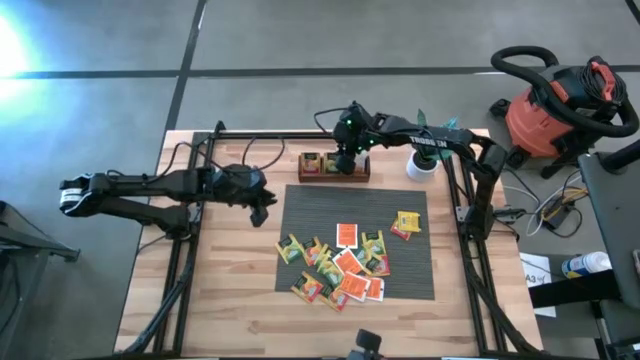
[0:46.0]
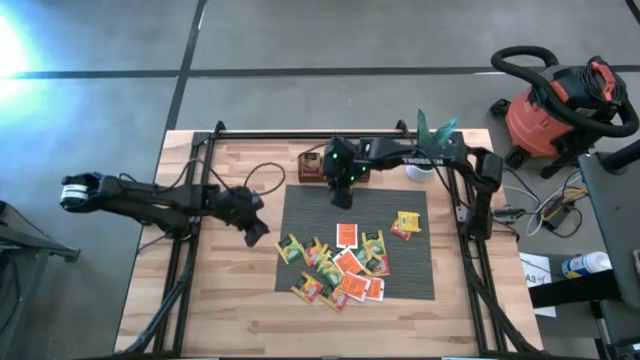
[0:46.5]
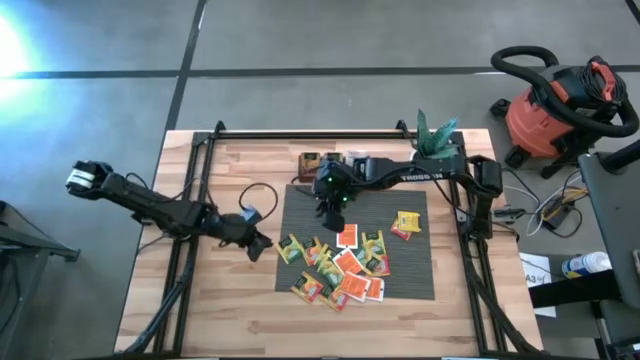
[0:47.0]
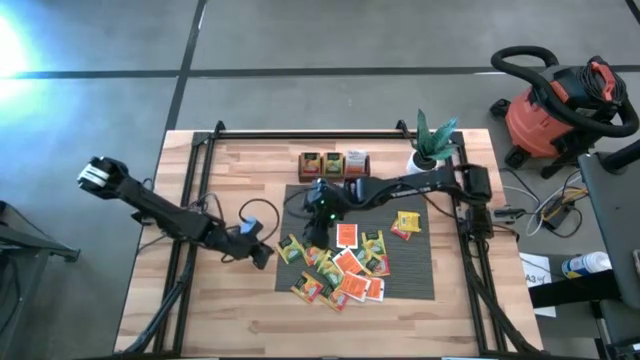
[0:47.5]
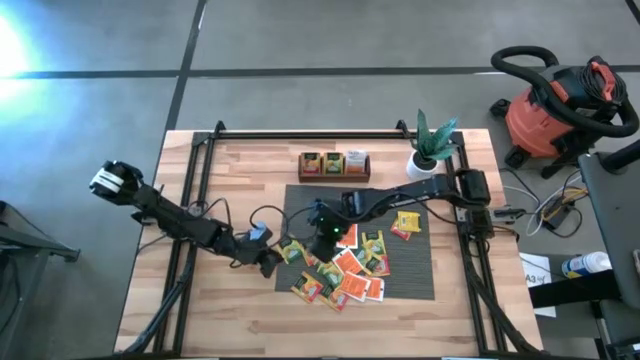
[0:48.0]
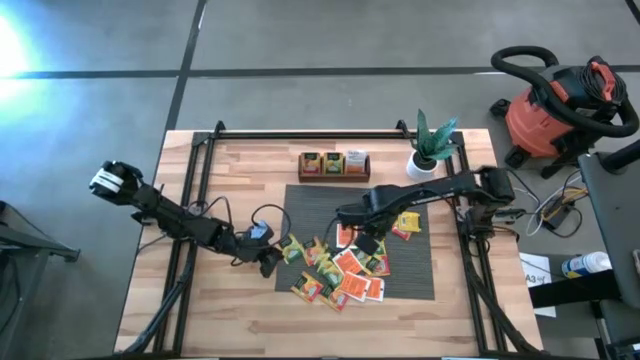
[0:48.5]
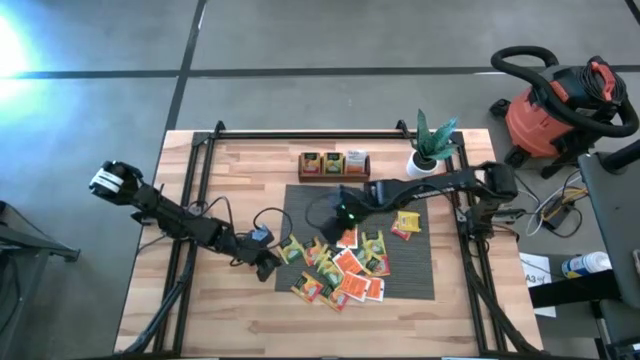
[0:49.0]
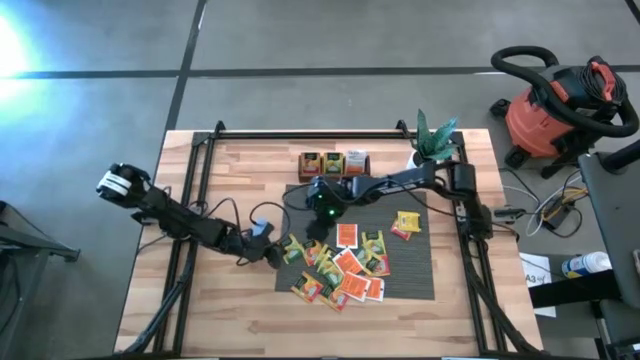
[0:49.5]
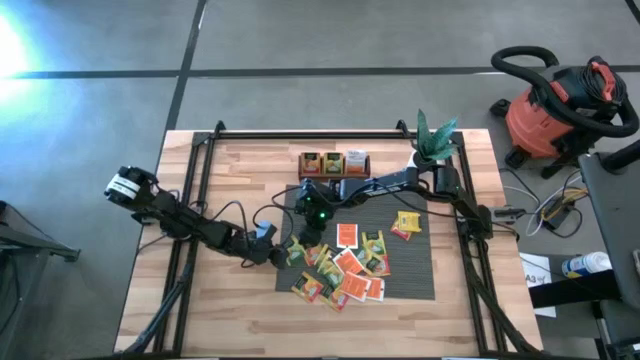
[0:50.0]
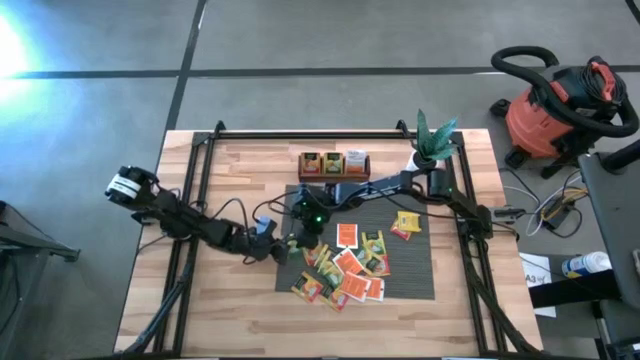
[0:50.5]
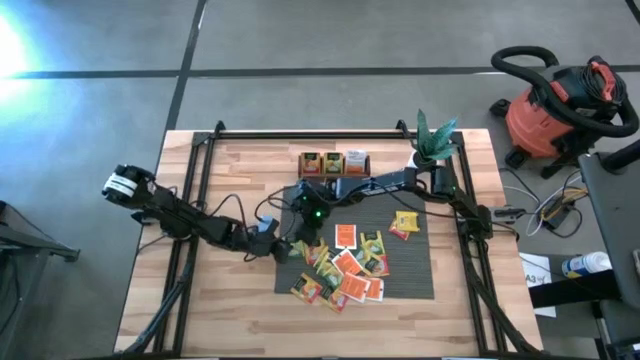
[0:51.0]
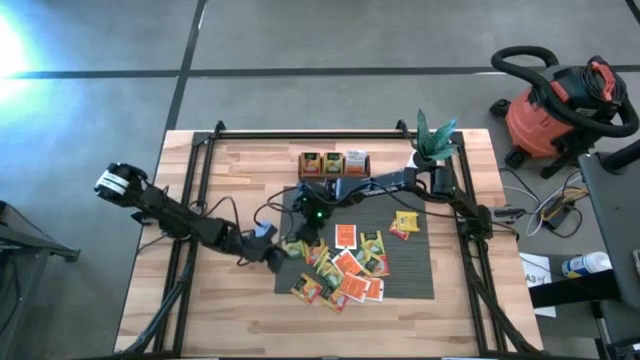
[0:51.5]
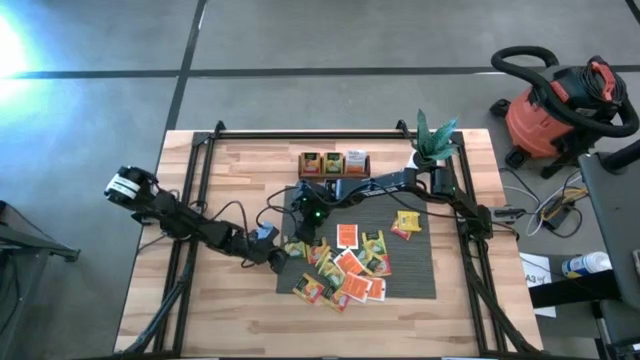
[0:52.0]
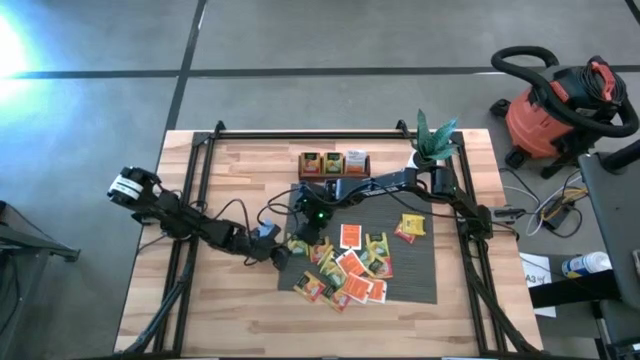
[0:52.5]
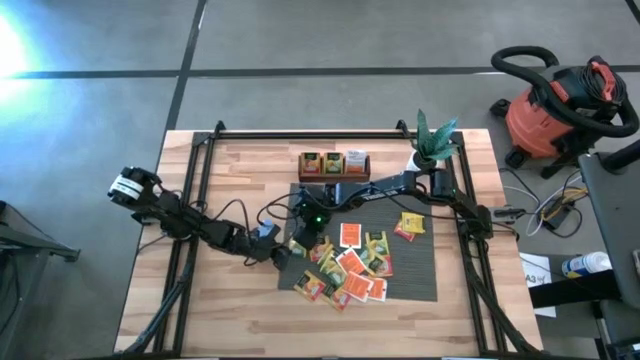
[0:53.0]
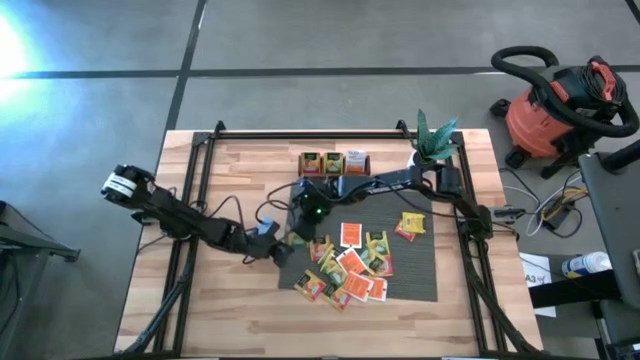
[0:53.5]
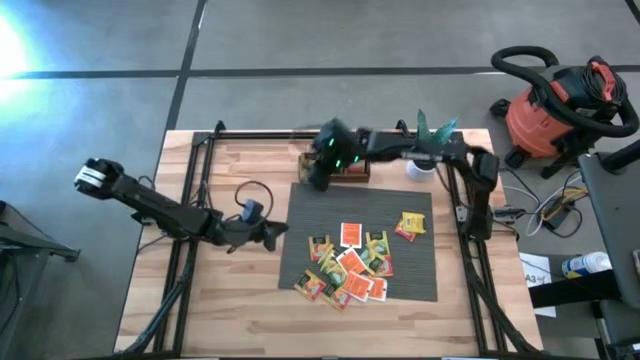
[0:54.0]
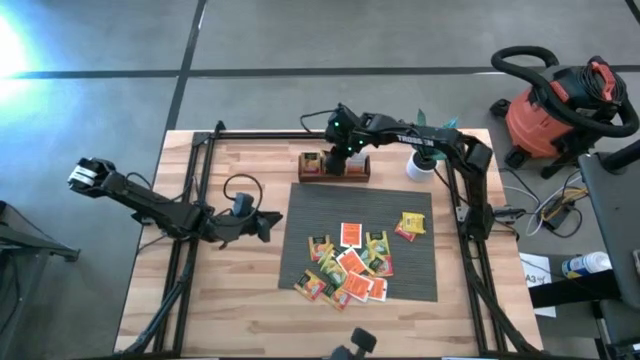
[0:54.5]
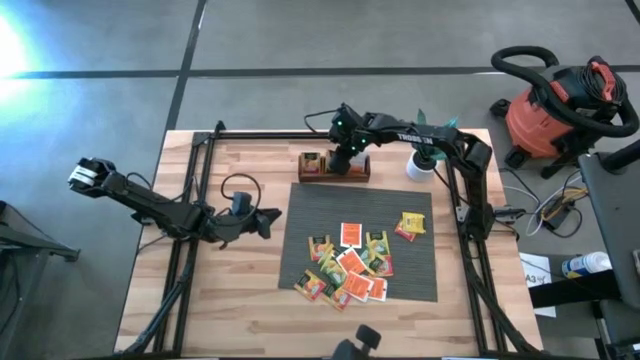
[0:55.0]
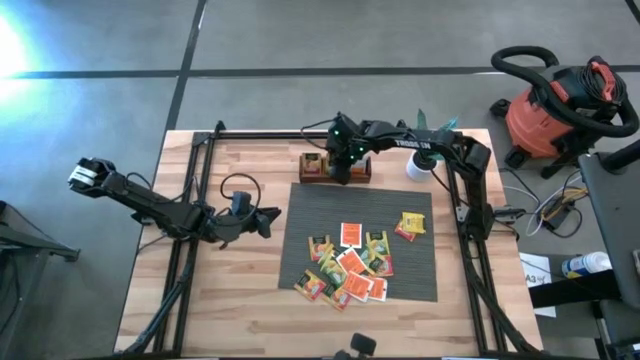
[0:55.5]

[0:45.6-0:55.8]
Task: Pick & Place Tea
Put the yellow tea bag into the middle section of the wooden organizer

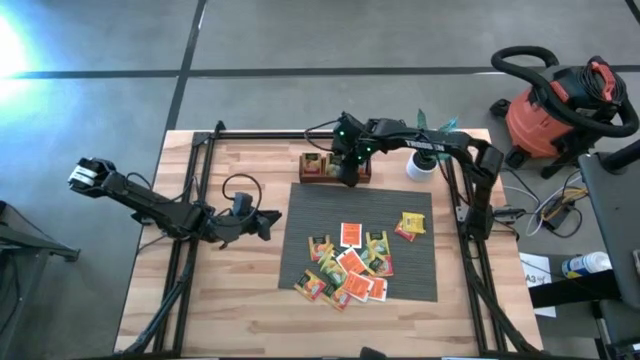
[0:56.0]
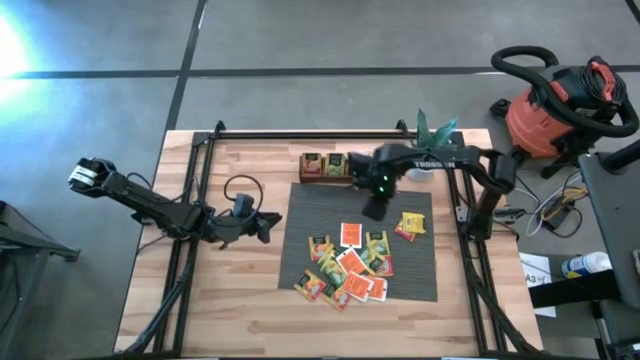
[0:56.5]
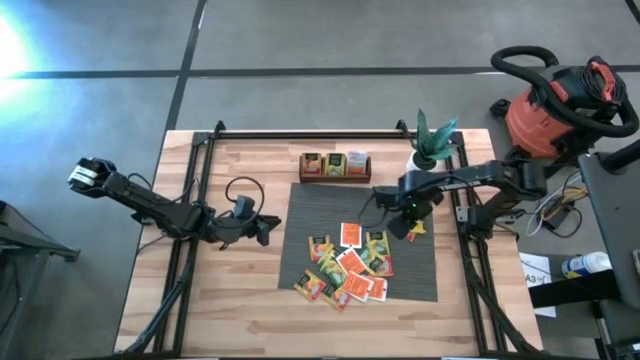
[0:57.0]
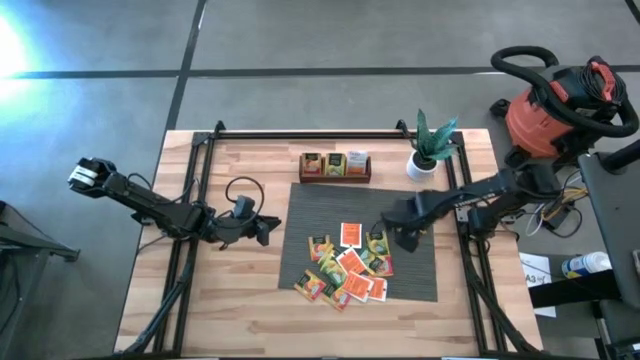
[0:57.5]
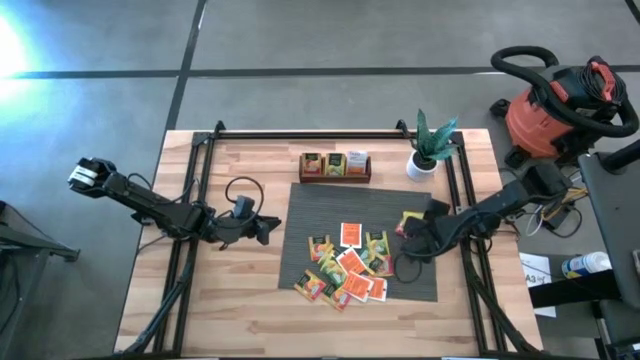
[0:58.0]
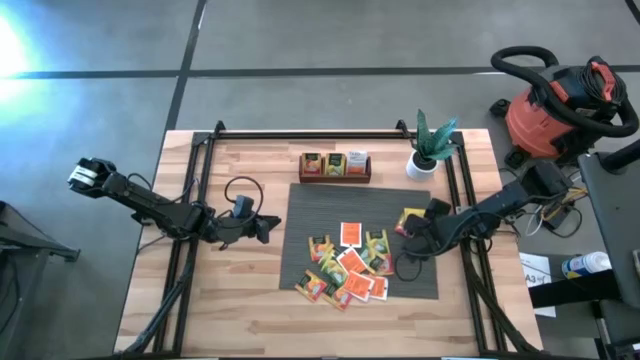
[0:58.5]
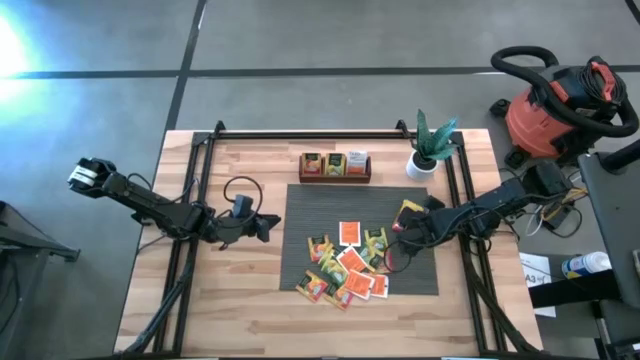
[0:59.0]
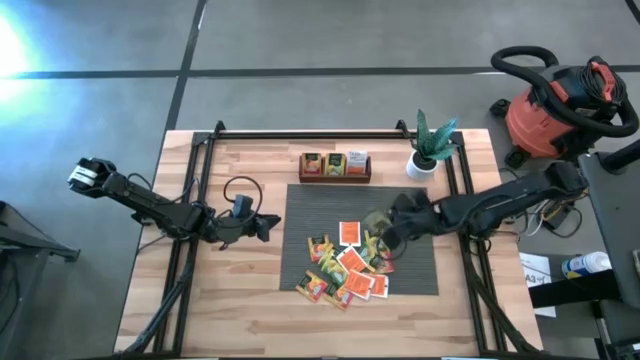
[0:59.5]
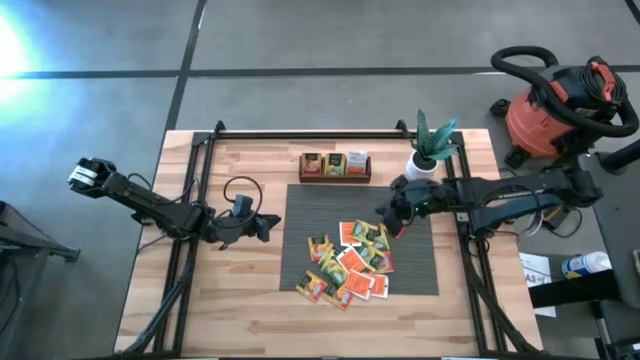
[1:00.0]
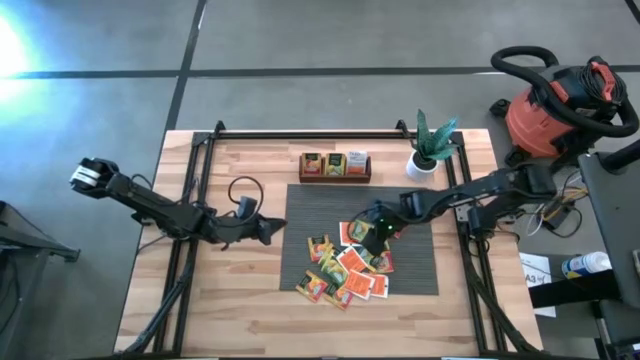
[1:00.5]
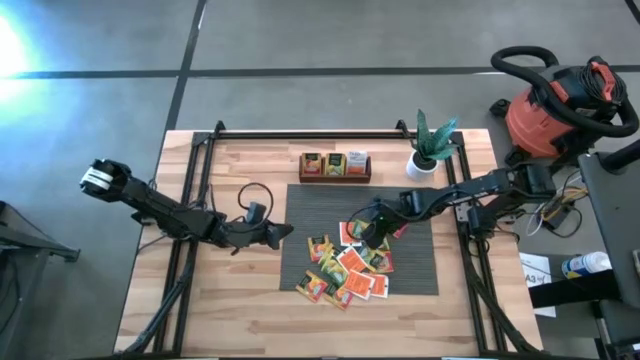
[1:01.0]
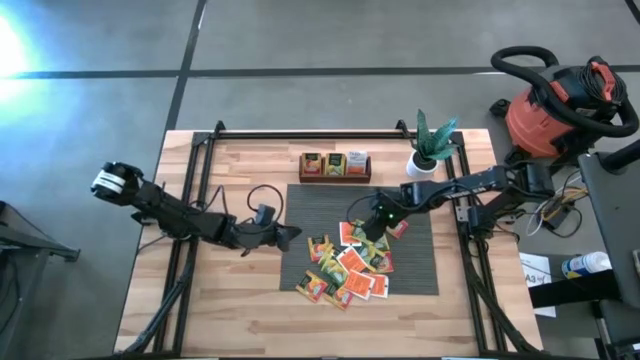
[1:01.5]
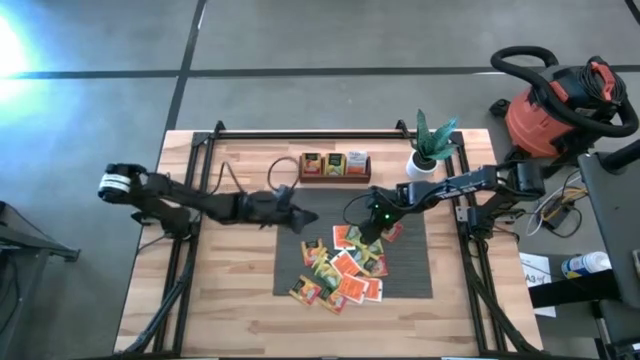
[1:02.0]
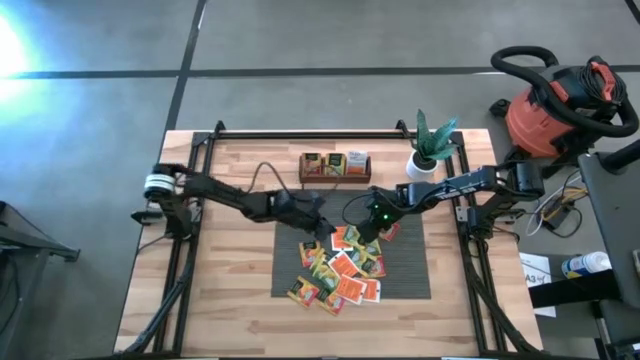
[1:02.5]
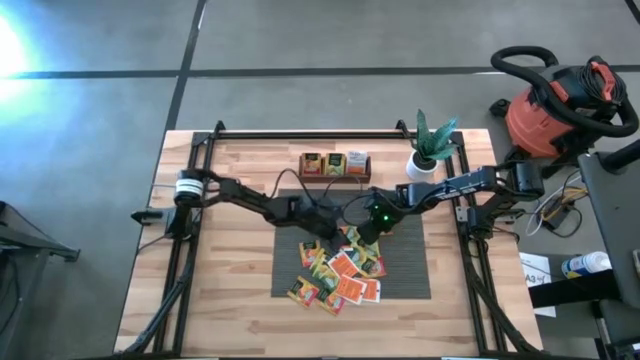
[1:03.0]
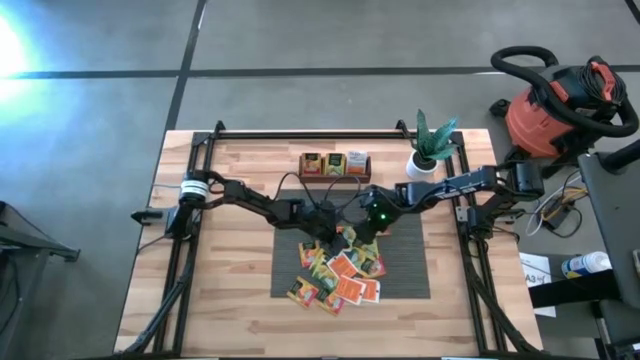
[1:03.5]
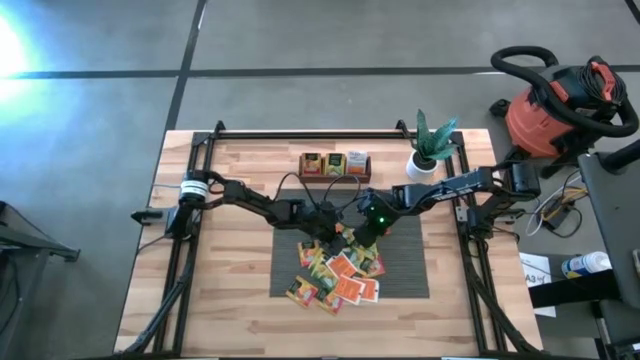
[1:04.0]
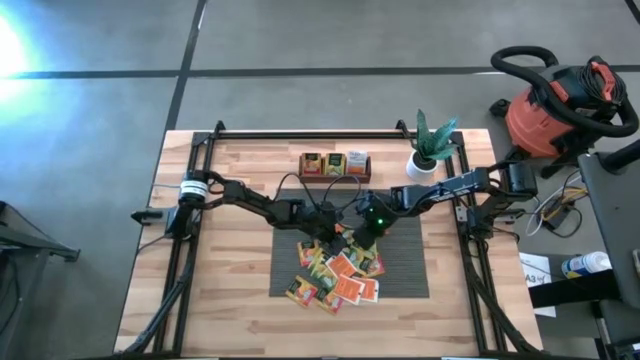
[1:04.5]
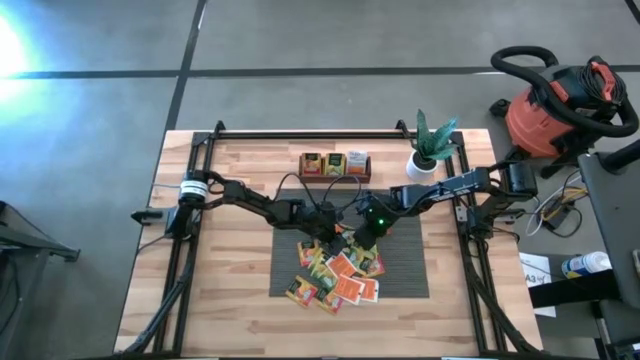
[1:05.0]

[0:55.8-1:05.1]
Put the yellow tea bag into the middle section of the wooden organizer
